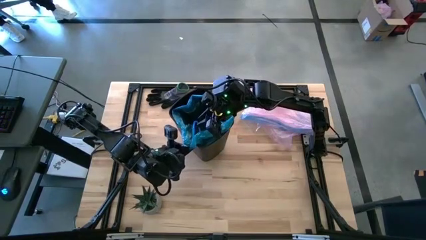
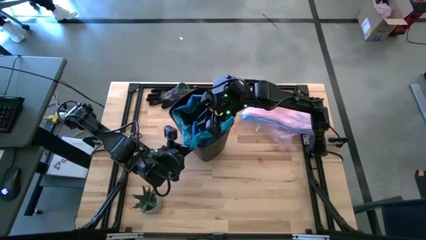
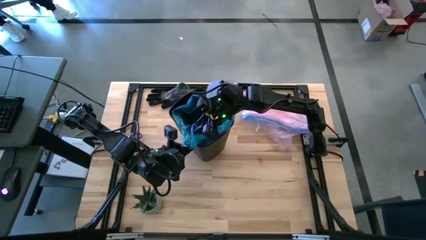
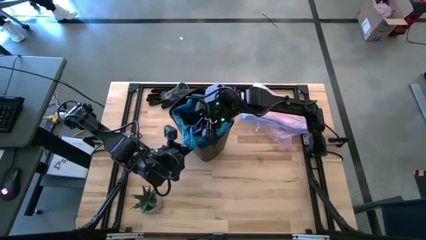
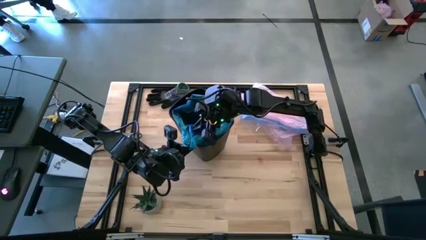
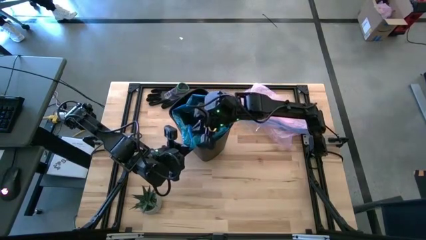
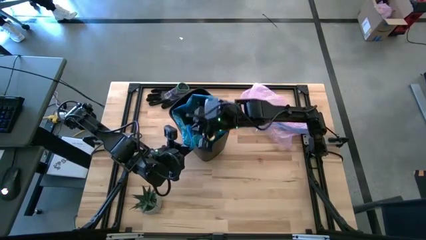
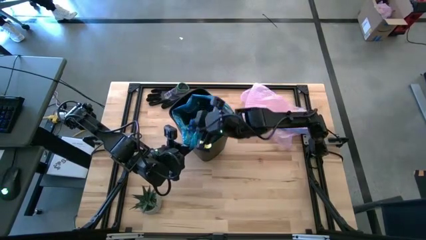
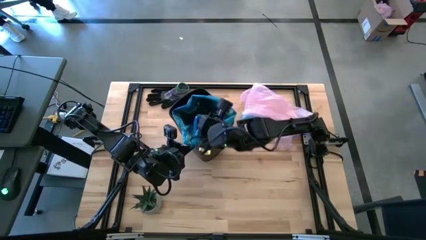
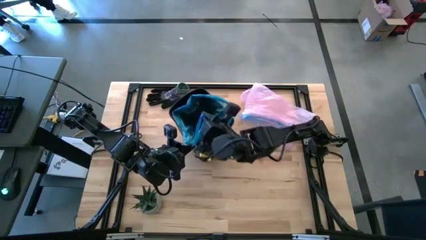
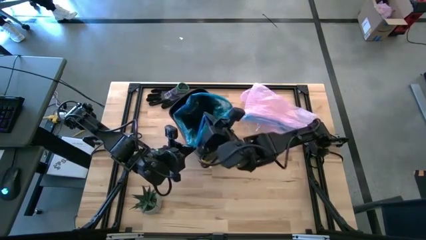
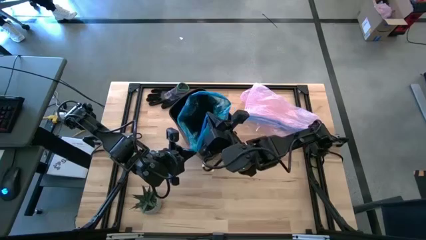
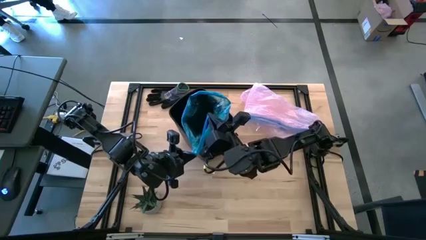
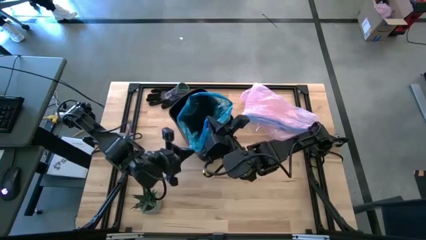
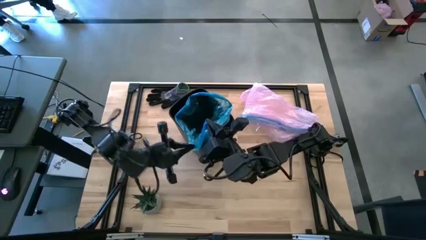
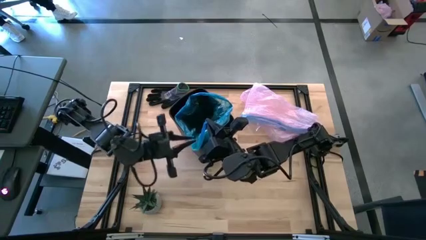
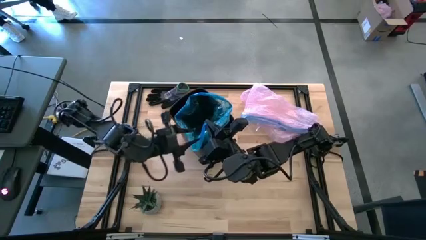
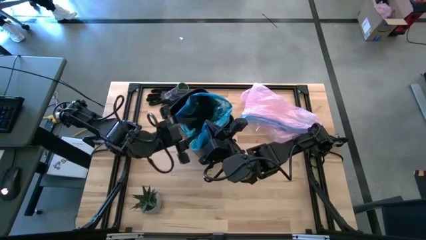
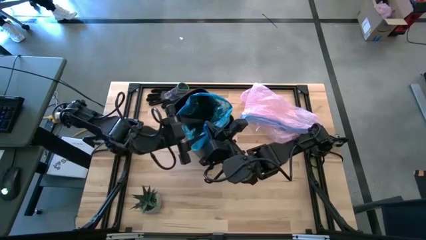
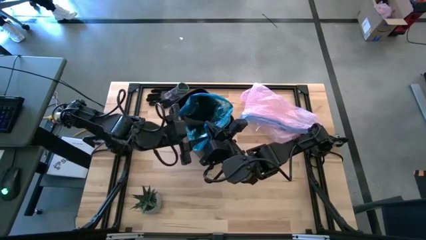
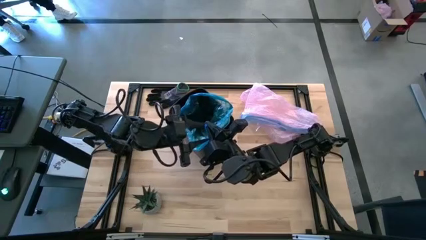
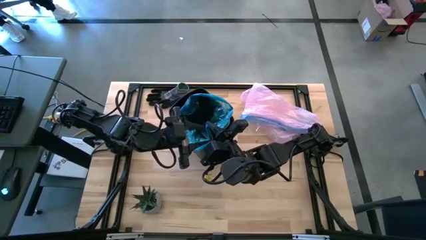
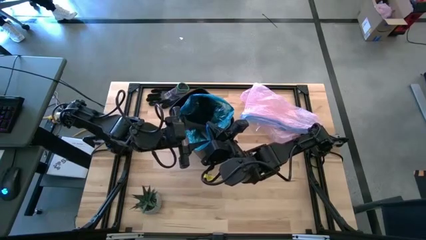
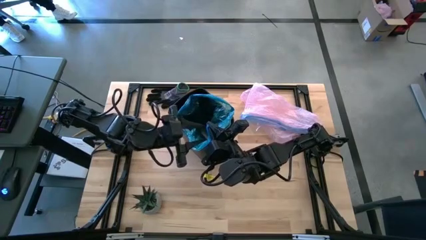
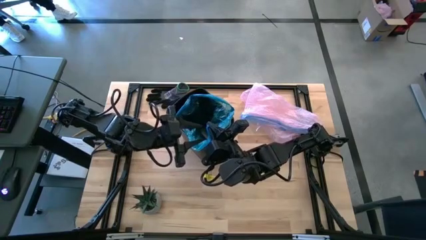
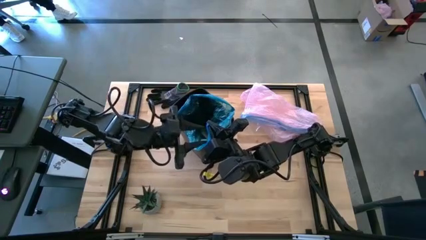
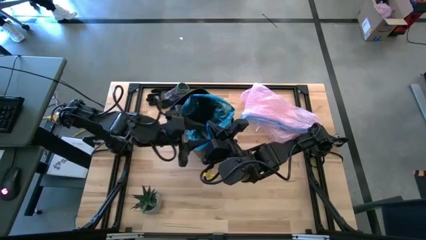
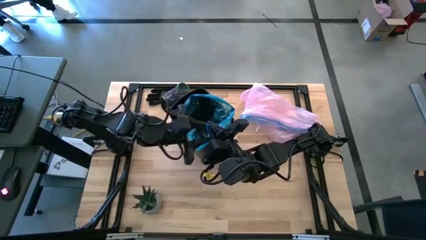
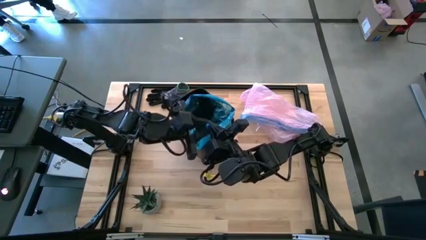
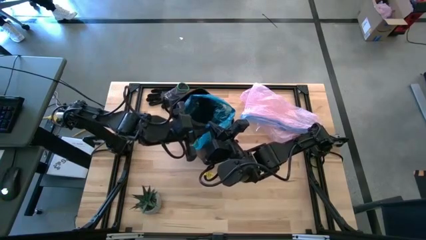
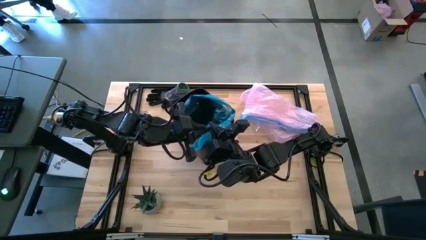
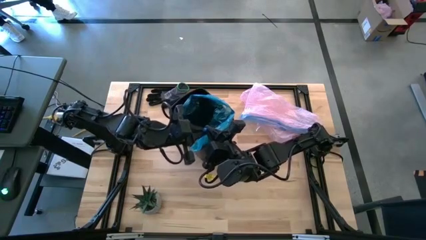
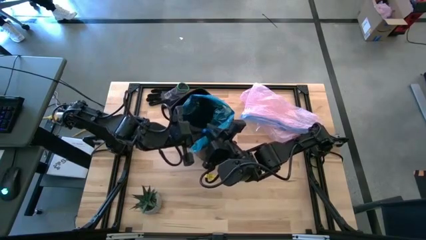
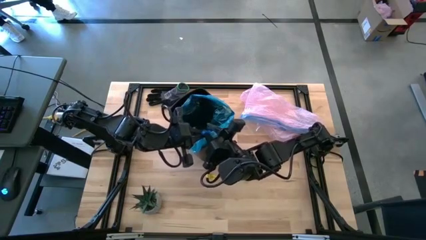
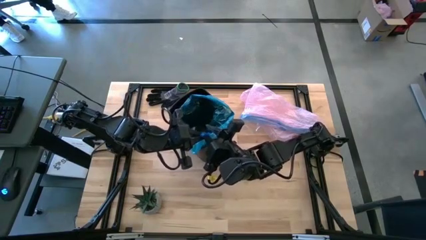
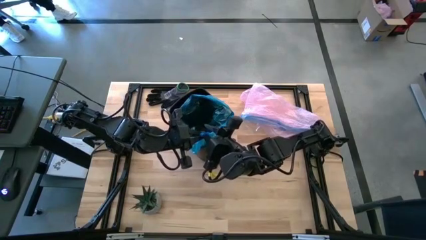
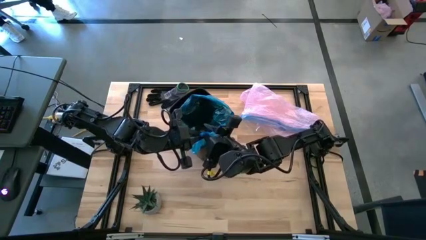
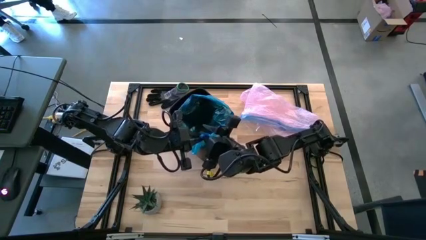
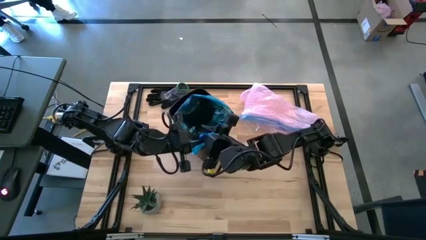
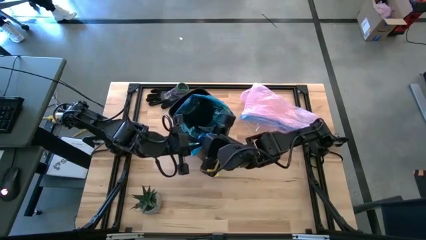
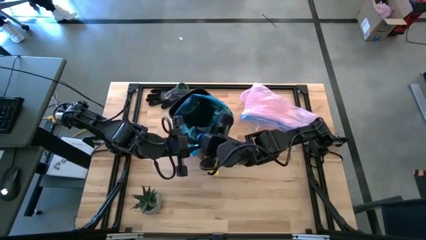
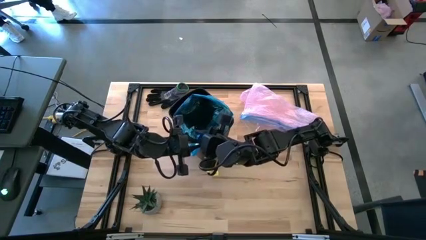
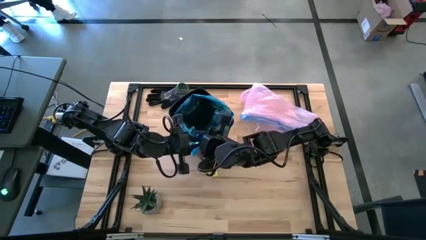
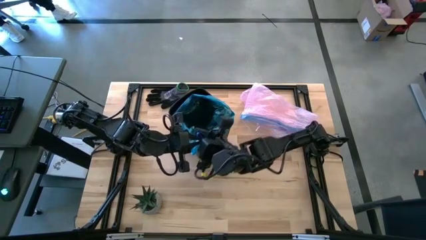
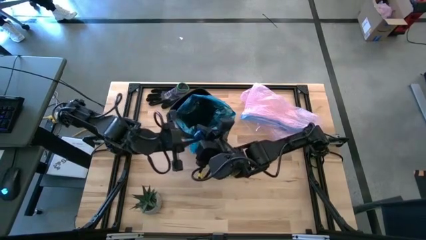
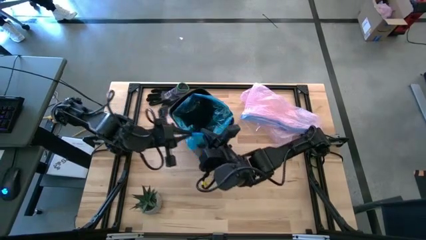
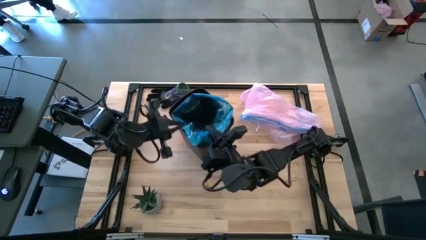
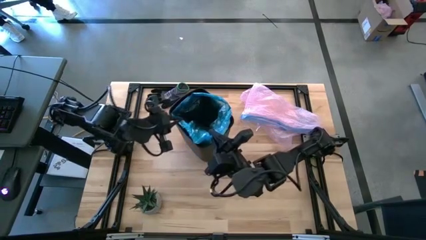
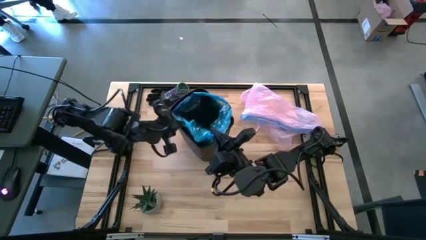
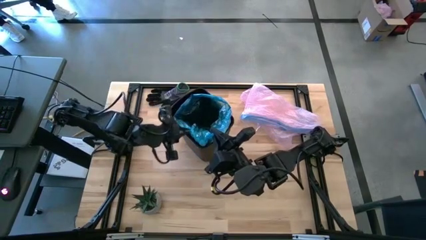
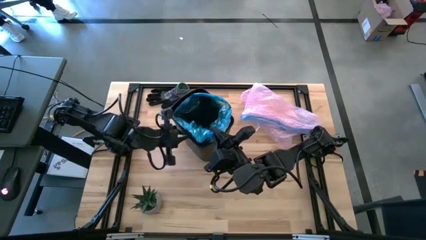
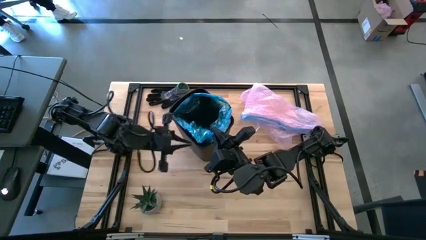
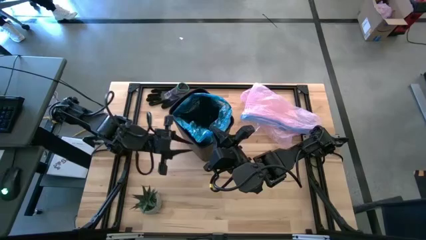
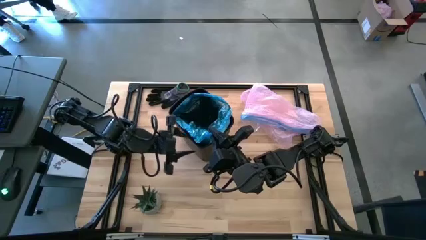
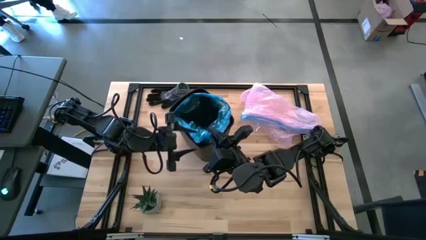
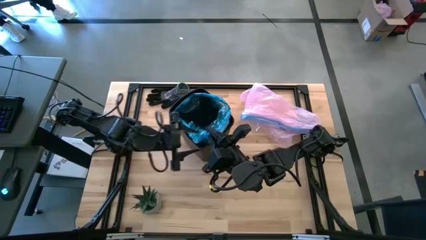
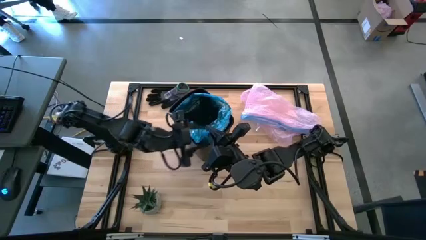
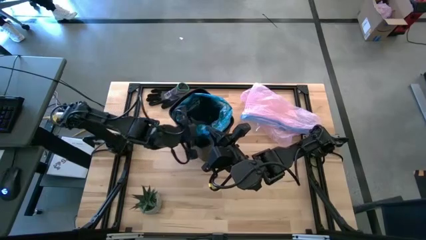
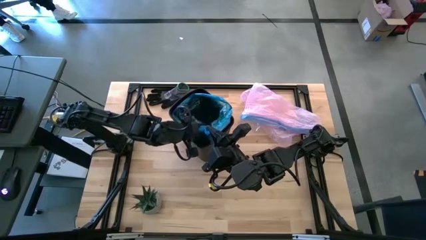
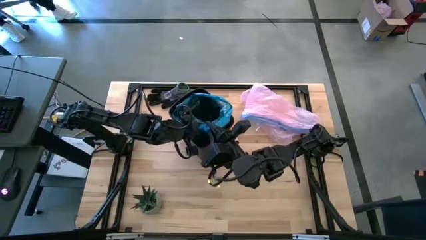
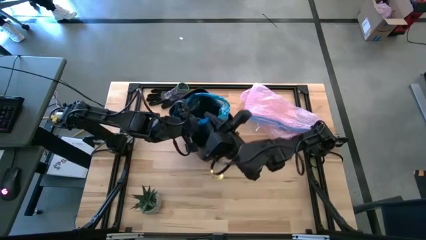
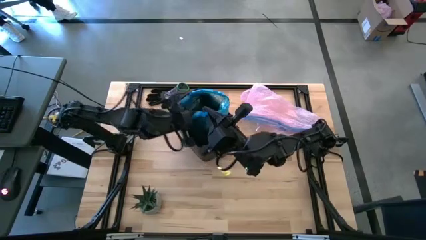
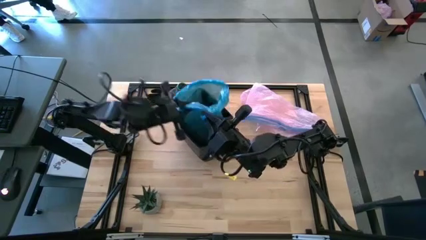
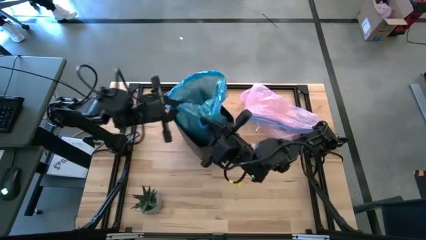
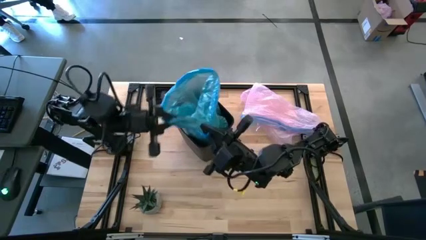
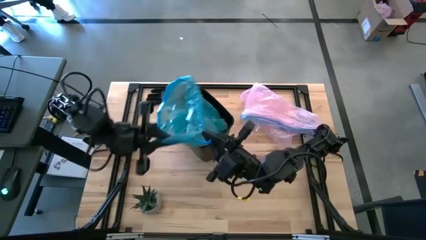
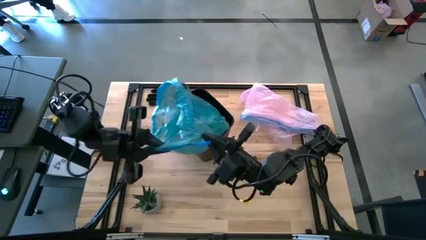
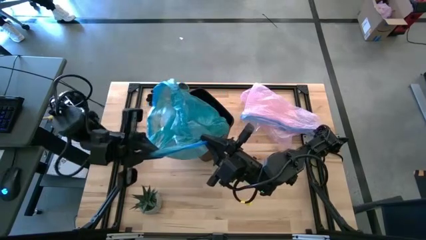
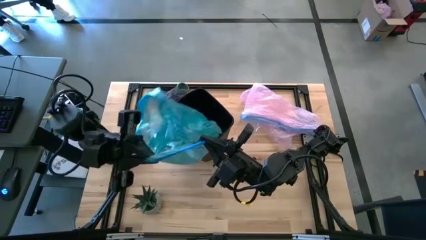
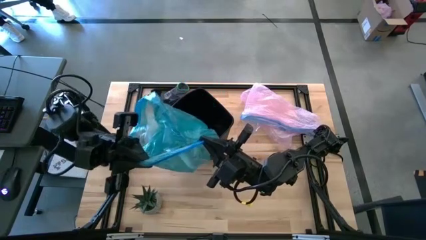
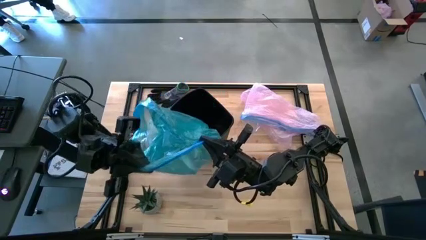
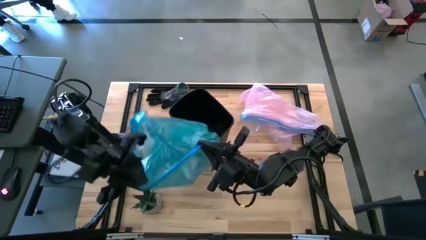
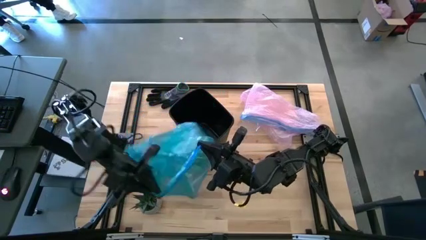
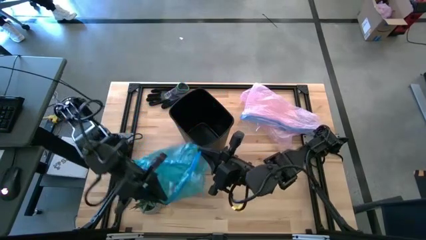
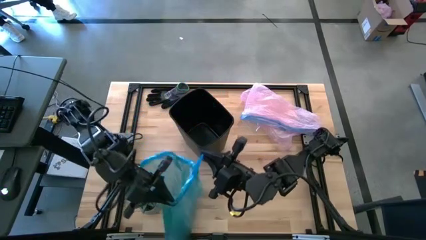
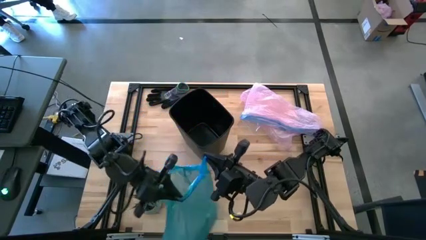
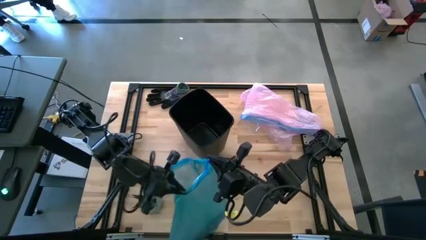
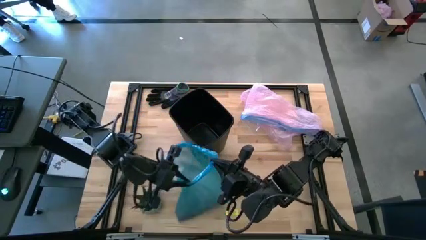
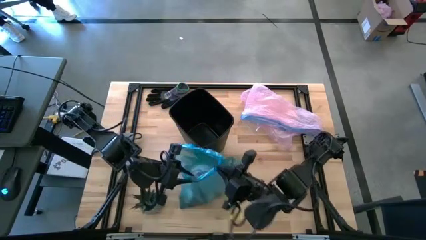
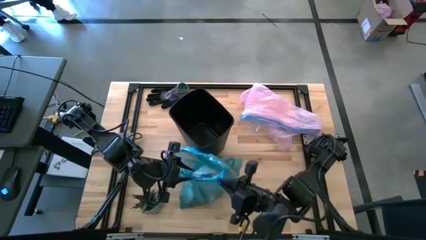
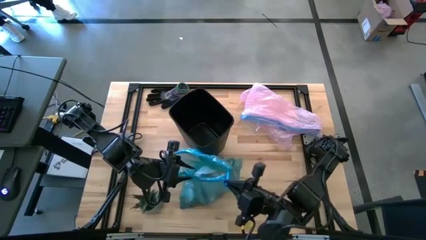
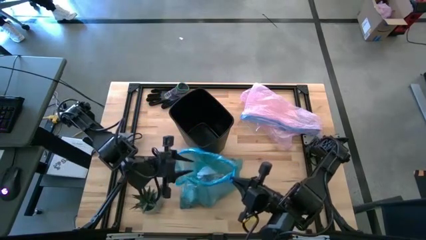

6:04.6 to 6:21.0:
Task: place trash/remove bag and relplace
Remove the blue trash bag from the trash bin
